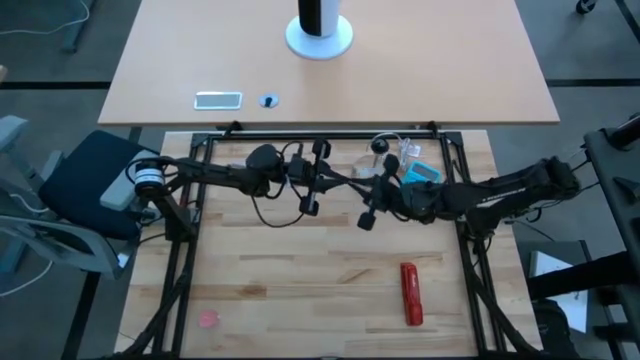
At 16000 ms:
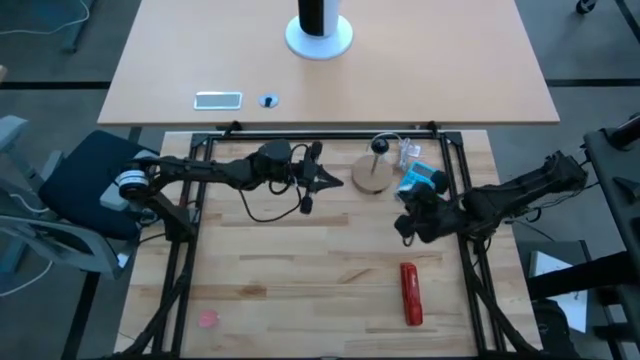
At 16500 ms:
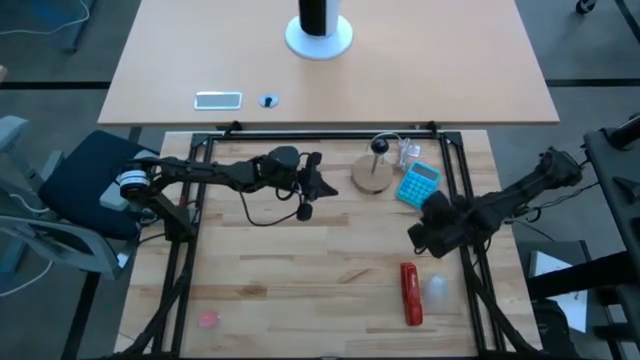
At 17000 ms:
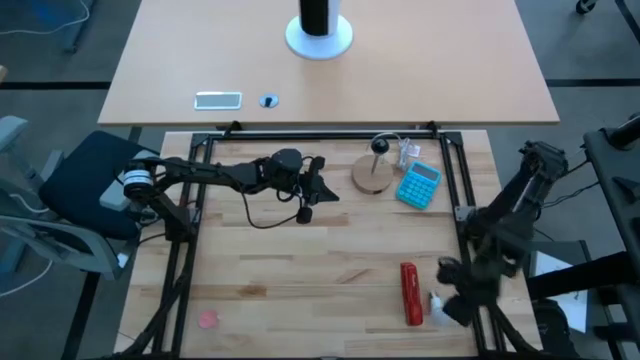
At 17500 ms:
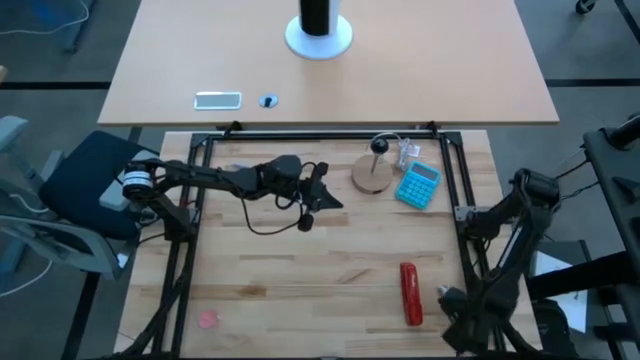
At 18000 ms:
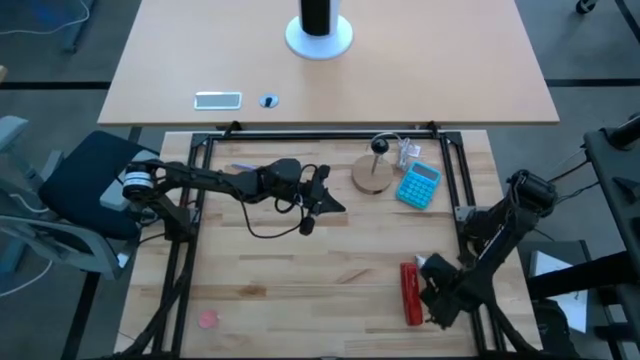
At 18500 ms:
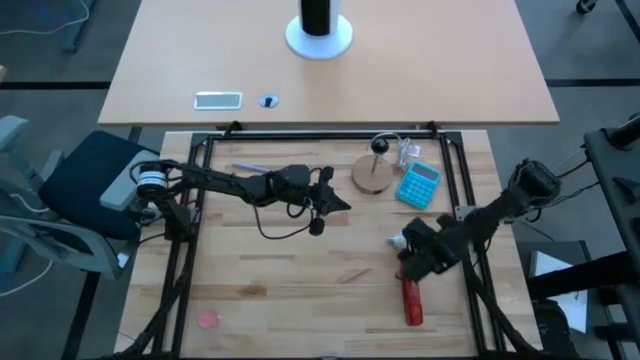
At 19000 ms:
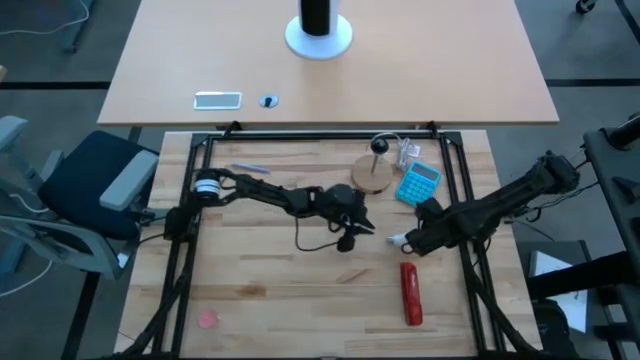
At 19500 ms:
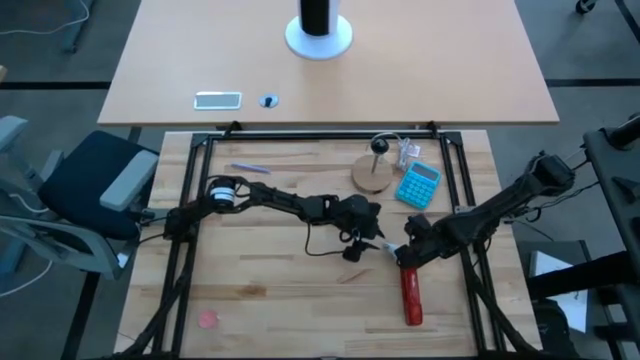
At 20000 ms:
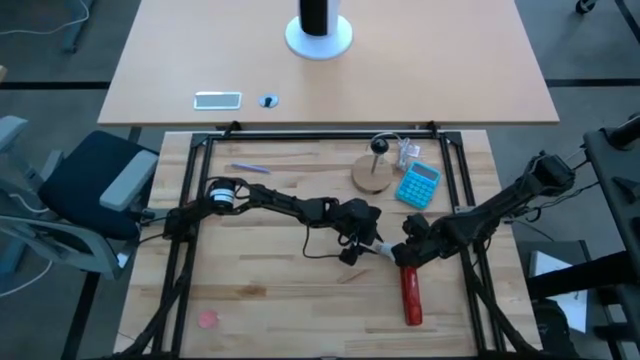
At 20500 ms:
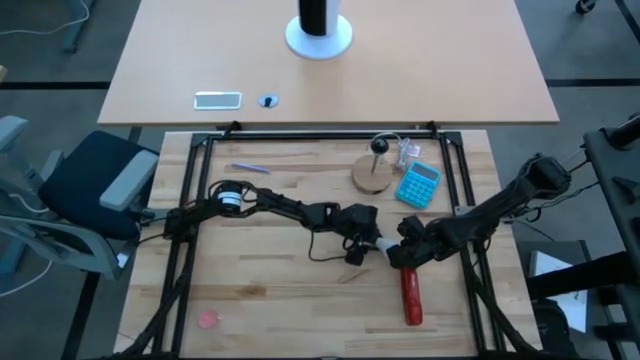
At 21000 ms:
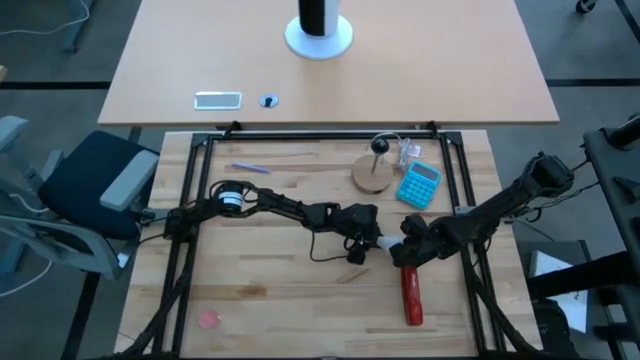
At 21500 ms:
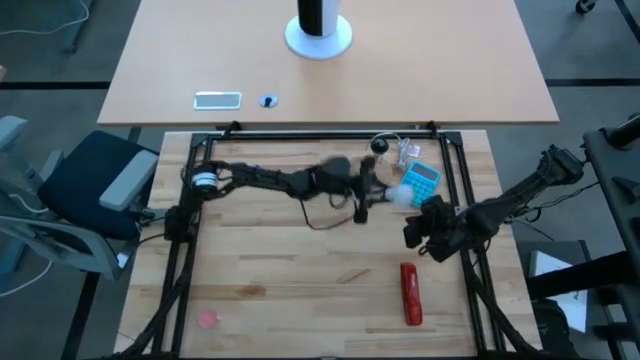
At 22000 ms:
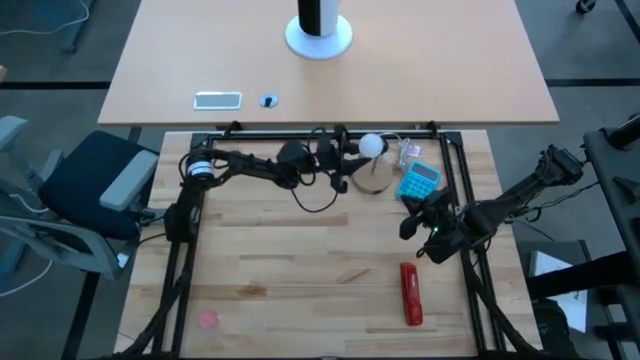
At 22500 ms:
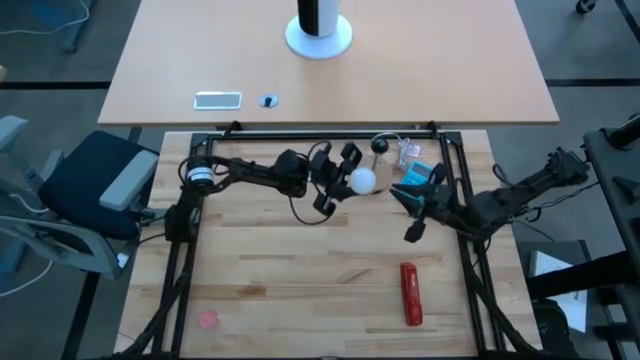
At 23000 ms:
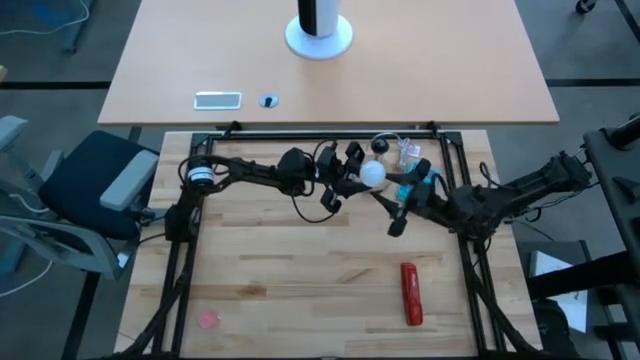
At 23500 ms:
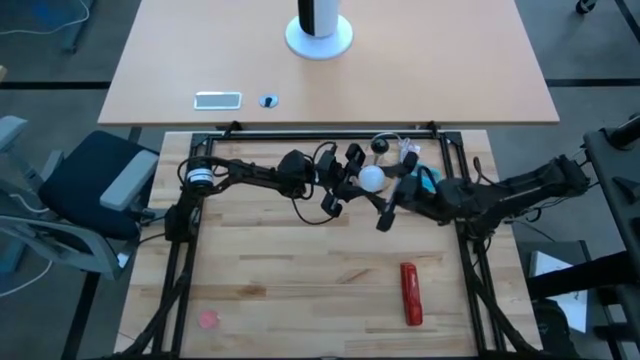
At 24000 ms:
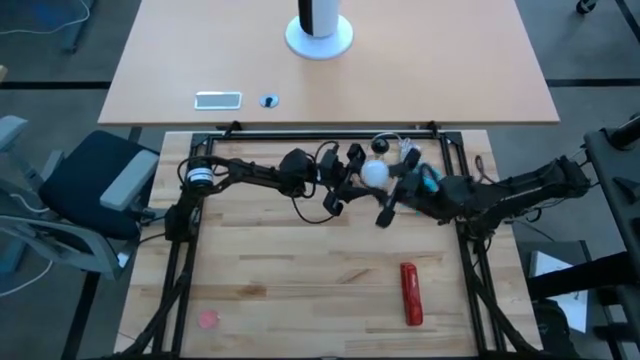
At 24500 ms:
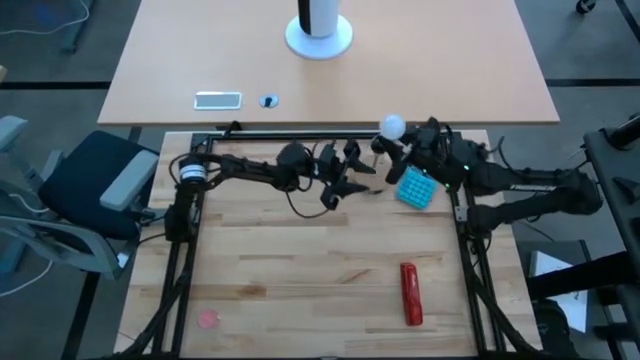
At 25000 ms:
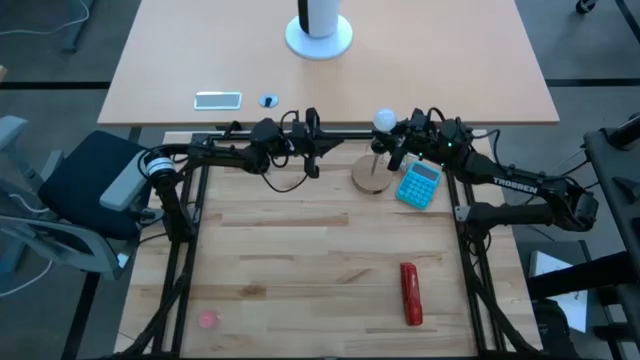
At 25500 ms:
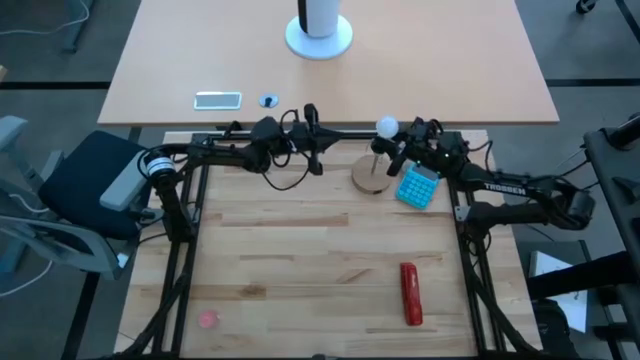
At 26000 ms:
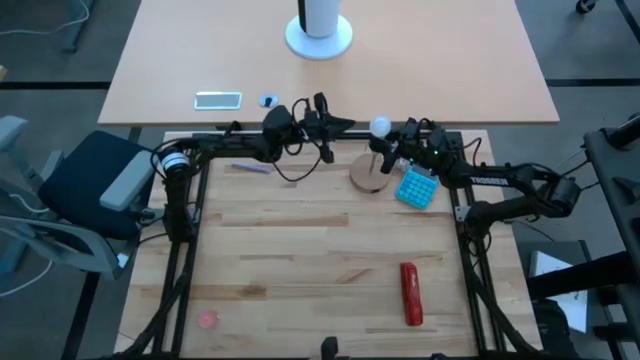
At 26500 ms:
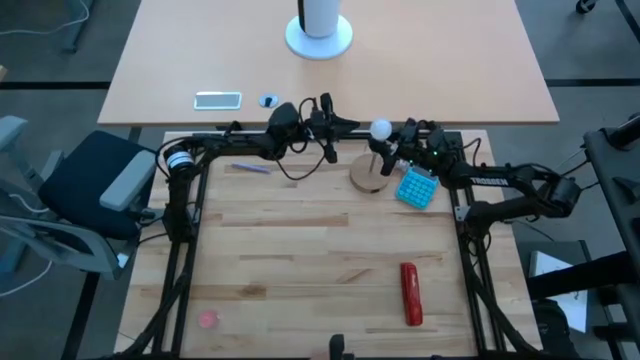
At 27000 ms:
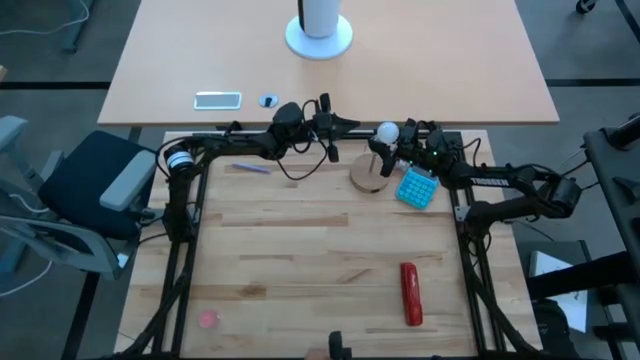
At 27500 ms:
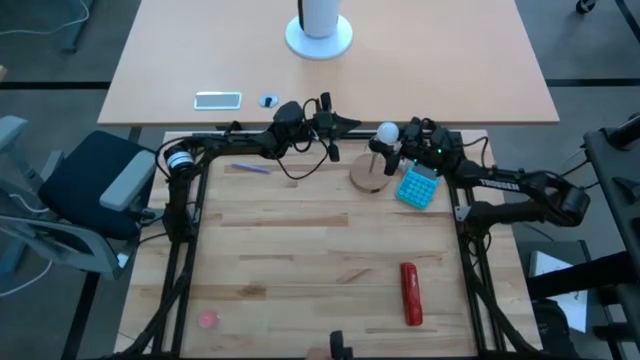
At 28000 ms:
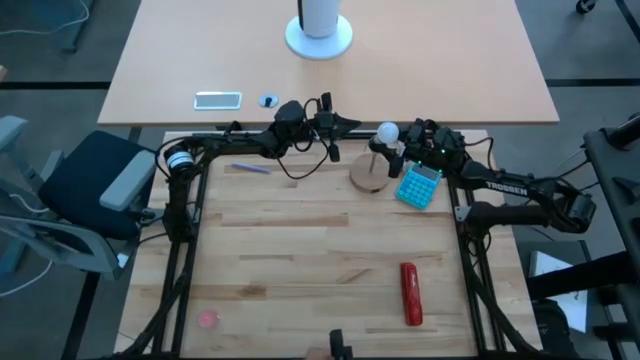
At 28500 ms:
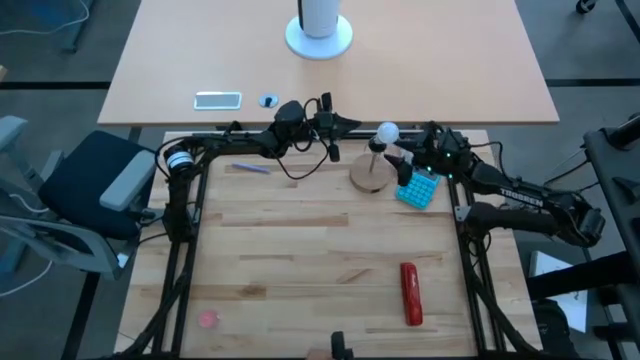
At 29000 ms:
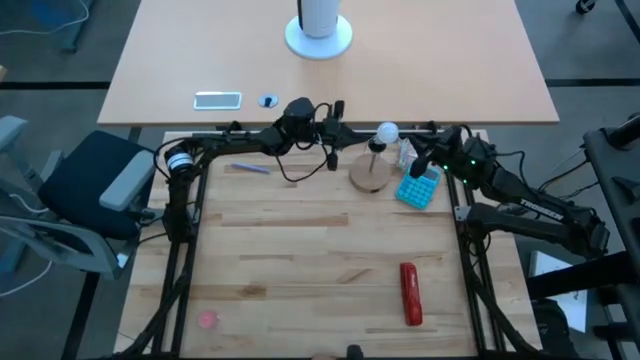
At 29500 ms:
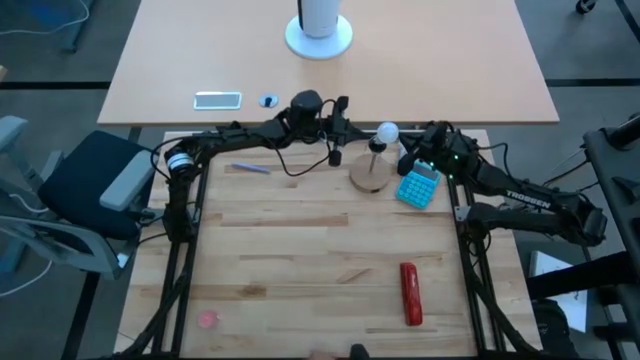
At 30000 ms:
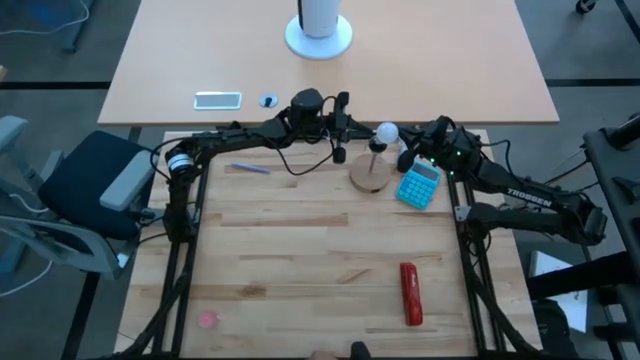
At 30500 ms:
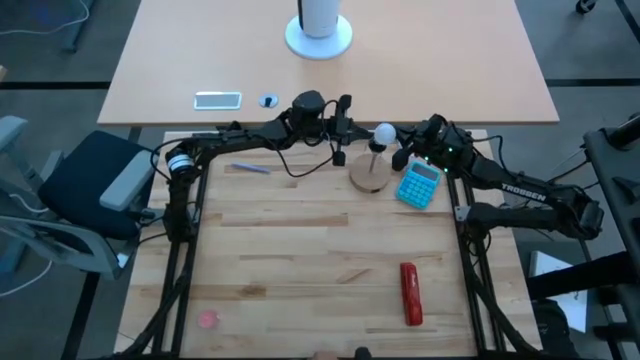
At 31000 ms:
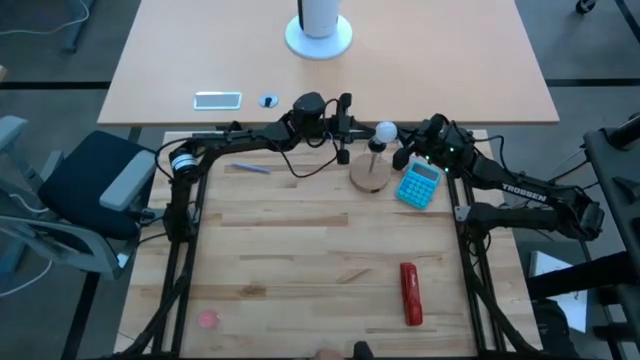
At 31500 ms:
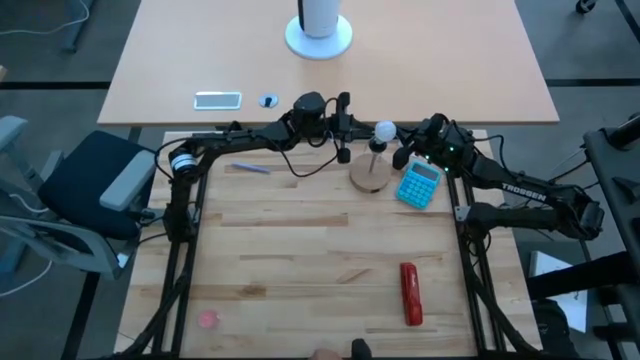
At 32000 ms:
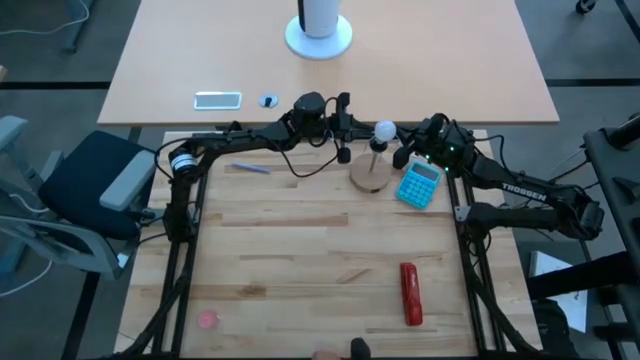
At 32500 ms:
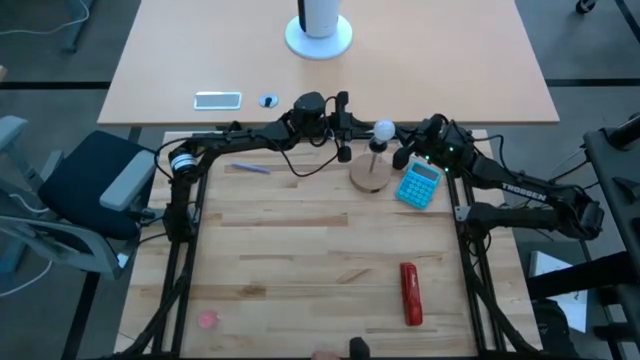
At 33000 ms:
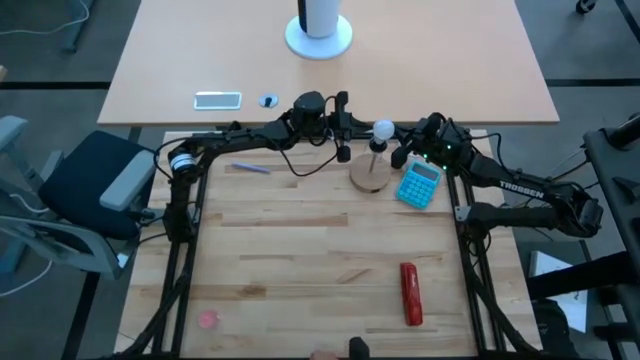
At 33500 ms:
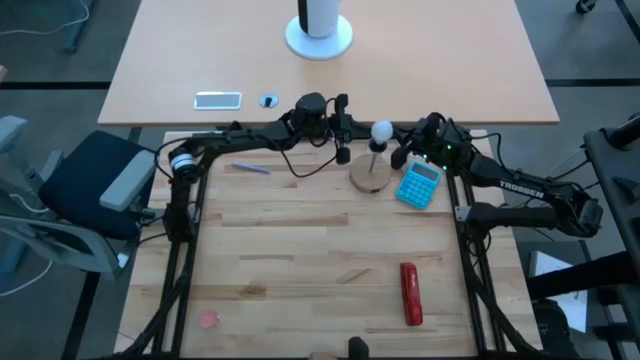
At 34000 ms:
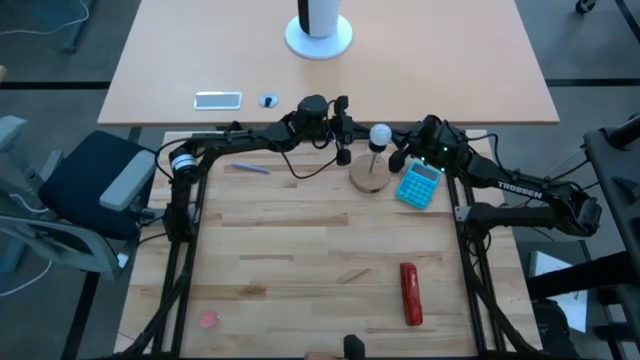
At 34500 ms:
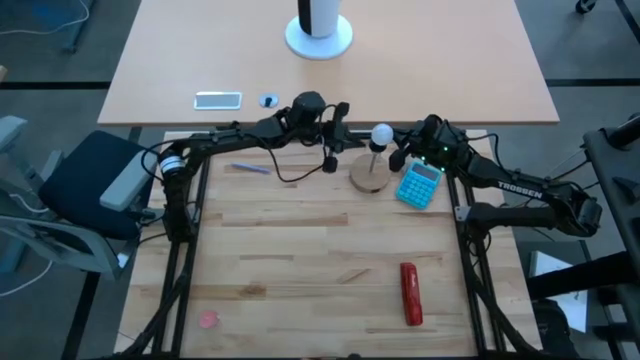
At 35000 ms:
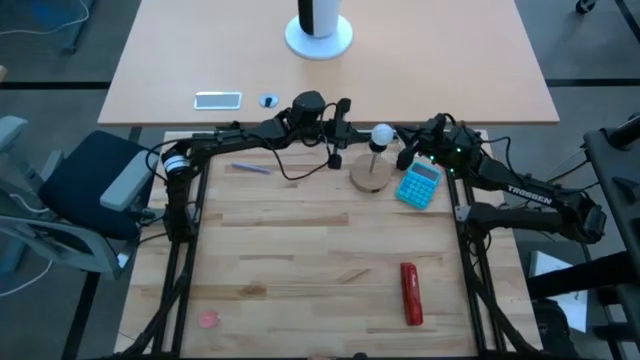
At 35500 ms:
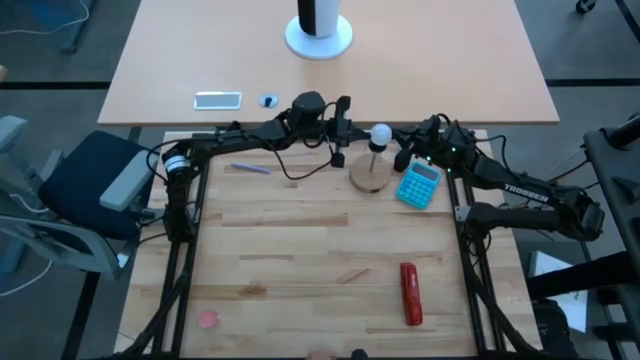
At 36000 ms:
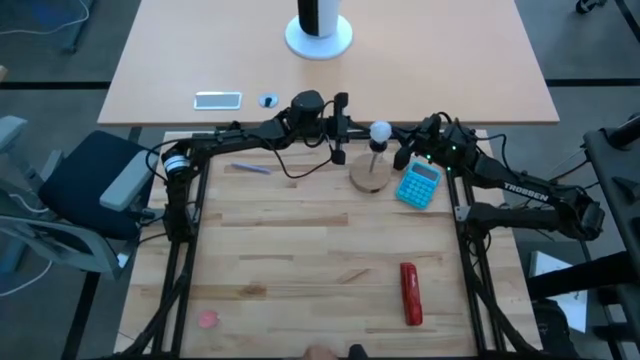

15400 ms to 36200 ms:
Task: Screw lightbulb
Insert the lightbulb into the lamp

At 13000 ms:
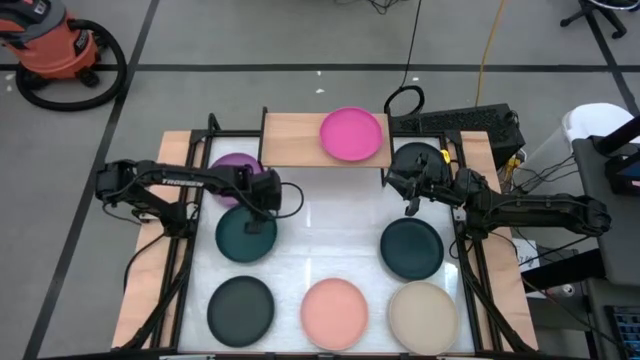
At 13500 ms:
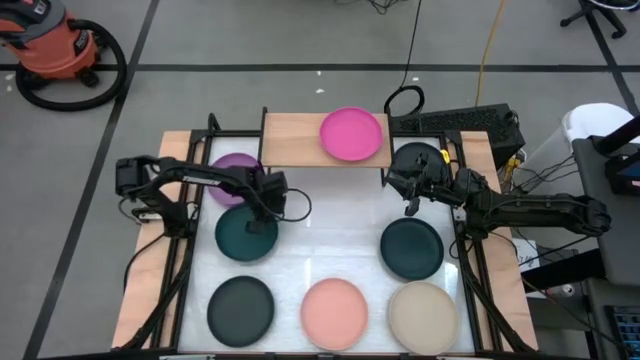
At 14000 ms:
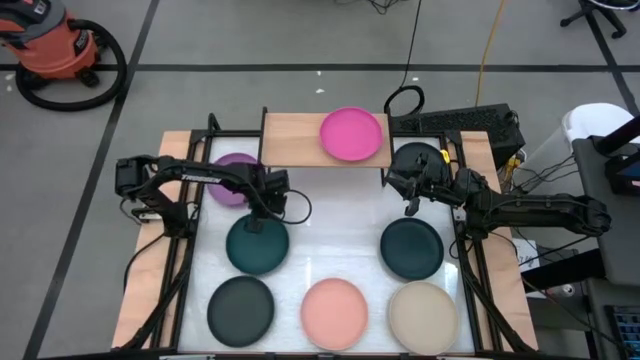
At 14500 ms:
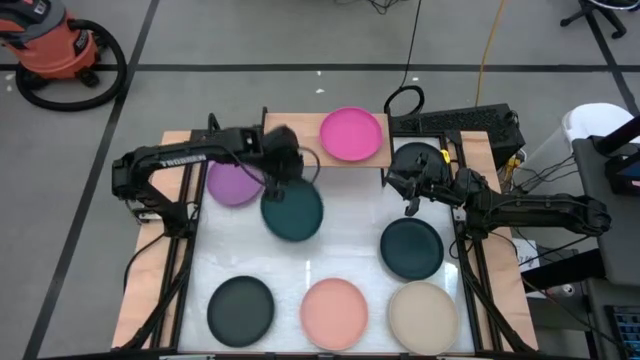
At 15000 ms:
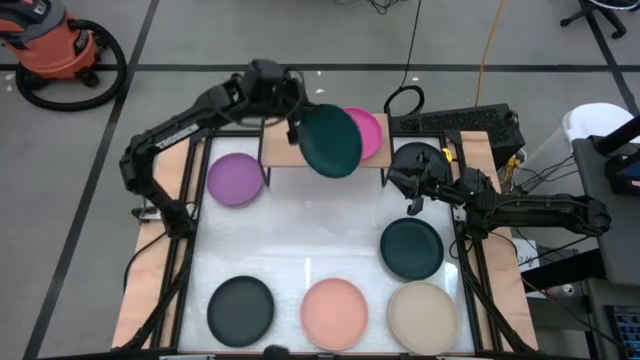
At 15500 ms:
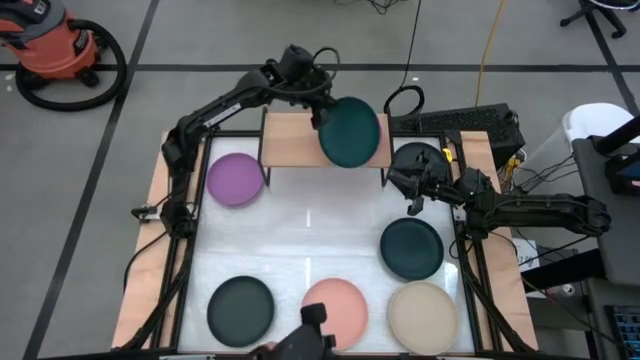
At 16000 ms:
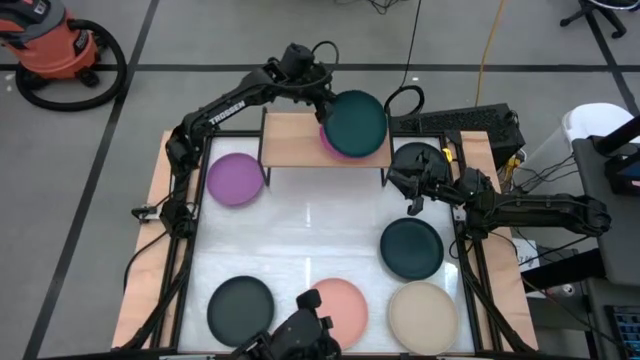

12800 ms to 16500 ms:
Task: Place and stack plates onto a shelf
Stack the left dark green plate on top of the pink plate on the shelf
